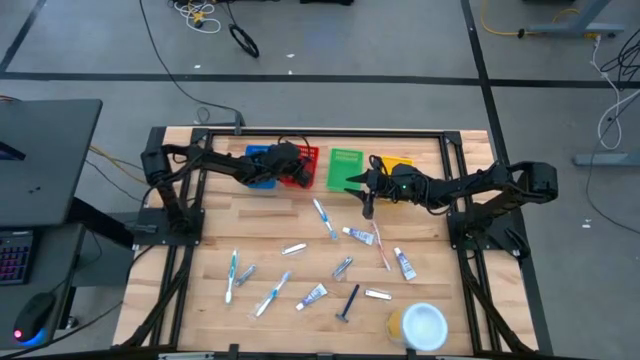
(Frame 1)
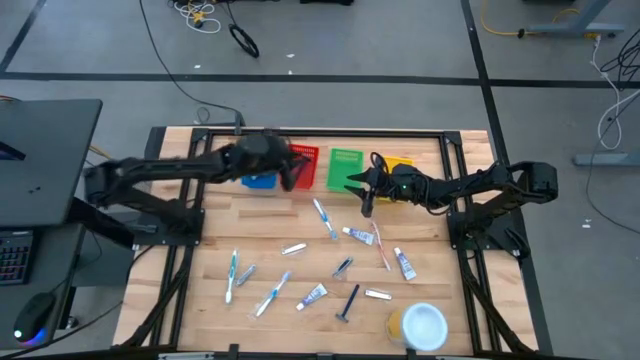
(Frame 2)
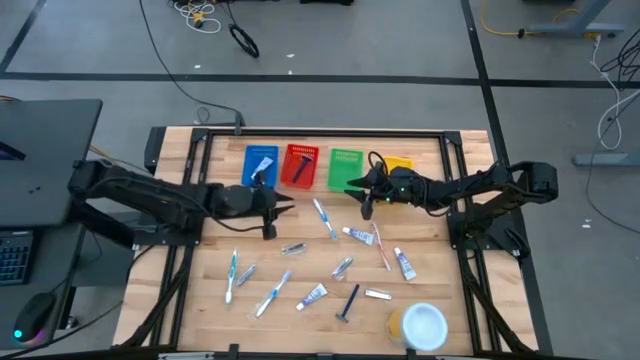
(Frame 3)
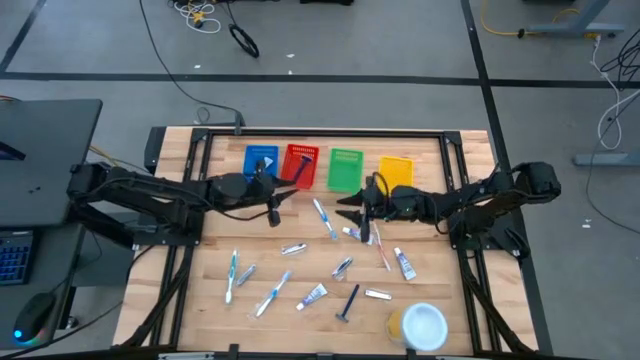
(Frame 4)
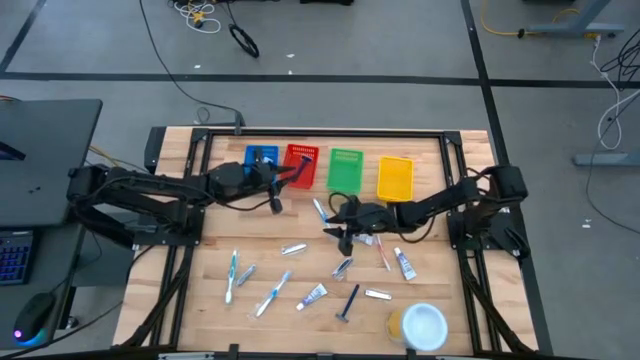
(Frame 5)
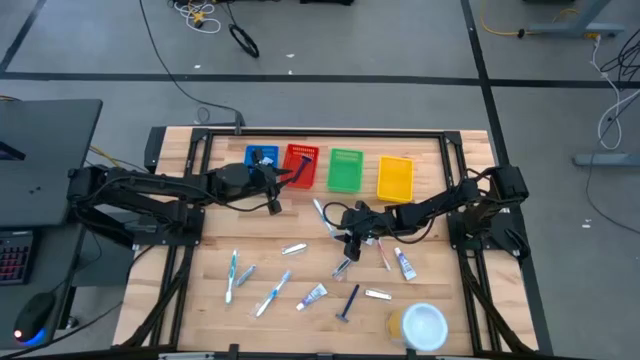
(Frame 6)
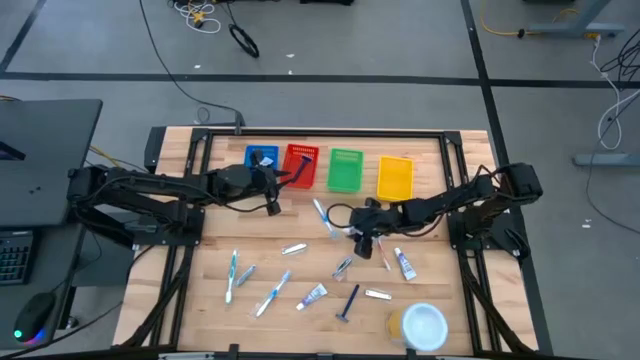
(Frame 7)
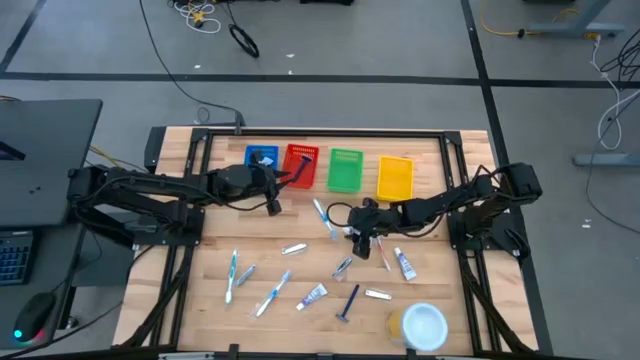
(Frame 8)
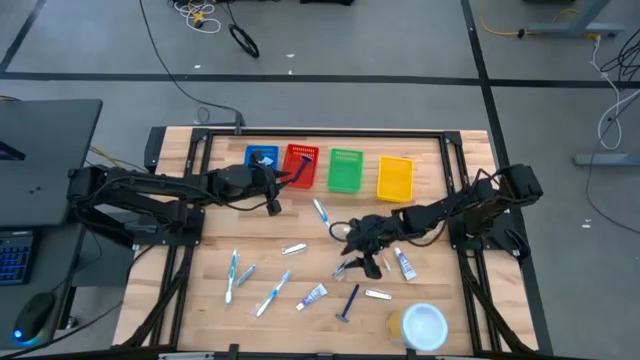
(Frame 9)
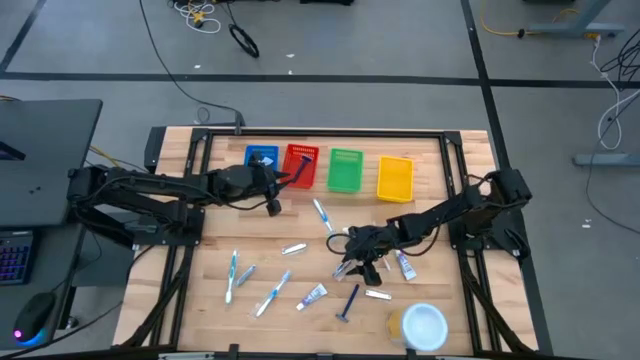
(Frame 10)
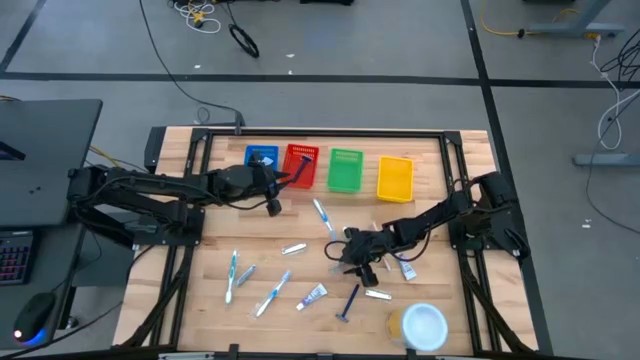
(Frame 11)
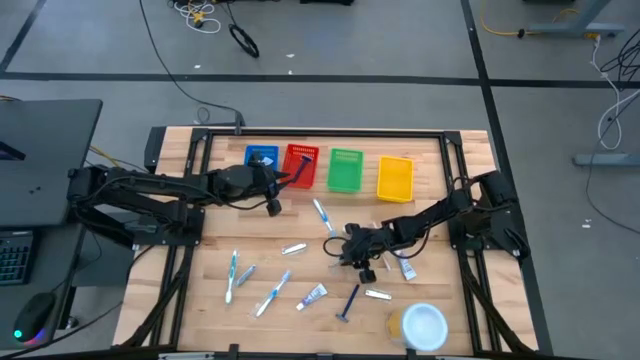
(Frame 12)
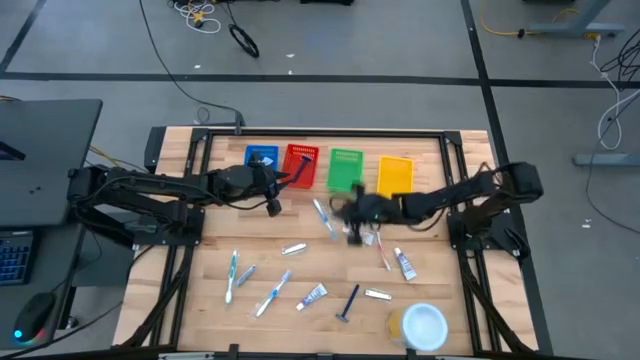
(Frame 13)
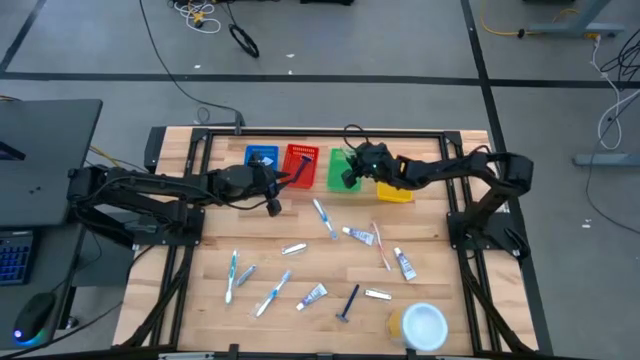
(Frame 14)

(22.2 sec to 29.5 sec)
Task: Pick & Place Travel size toiletries
Put the silver nail cutter into the green bin

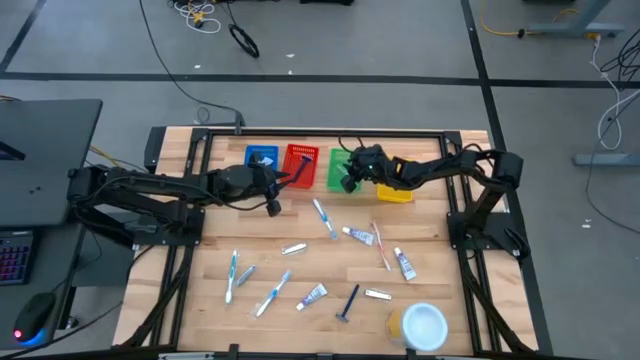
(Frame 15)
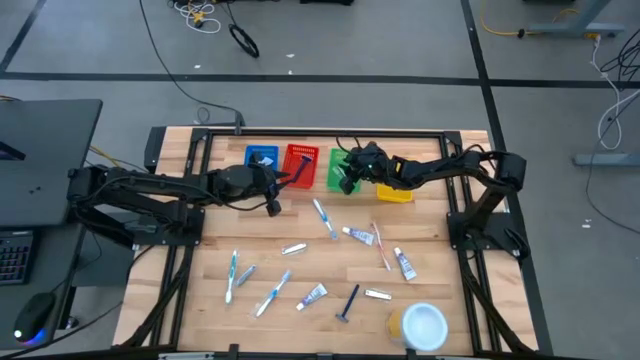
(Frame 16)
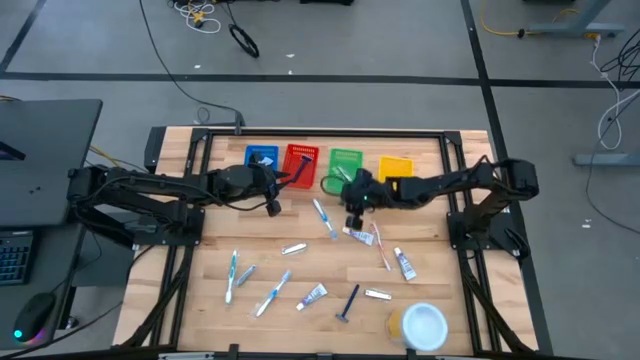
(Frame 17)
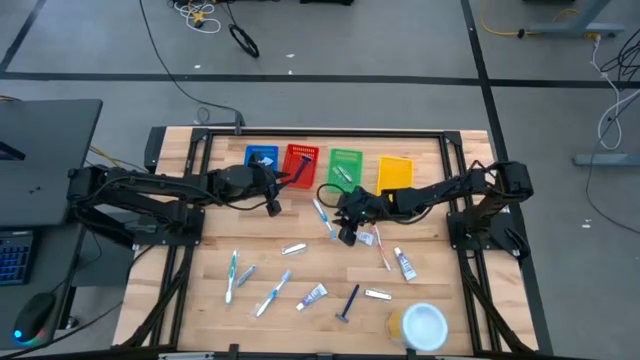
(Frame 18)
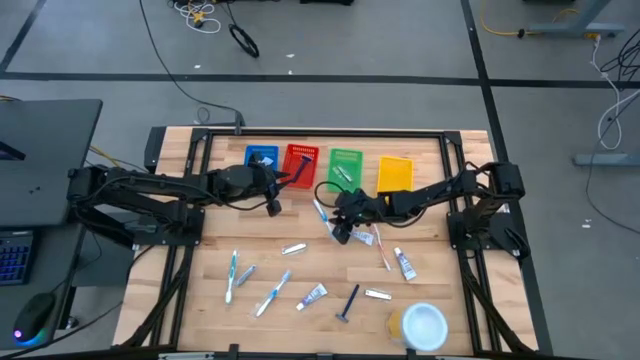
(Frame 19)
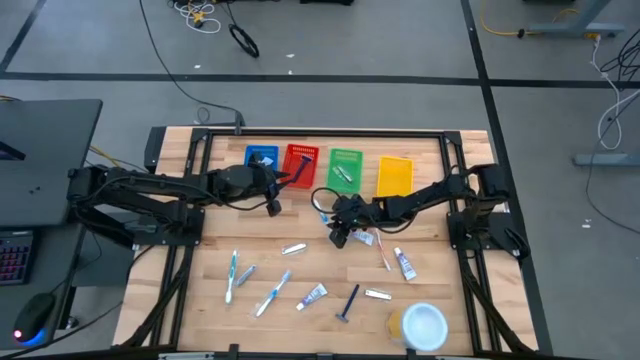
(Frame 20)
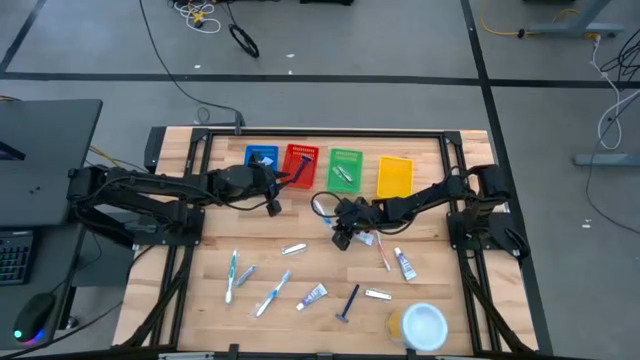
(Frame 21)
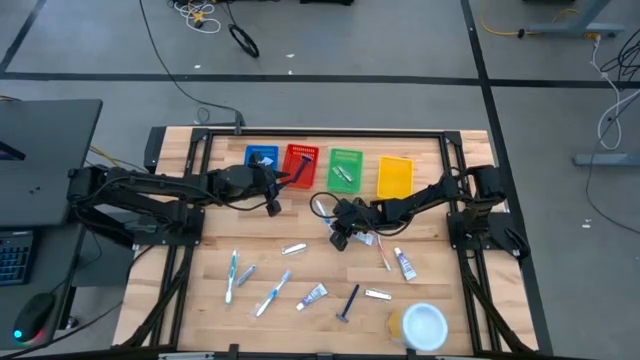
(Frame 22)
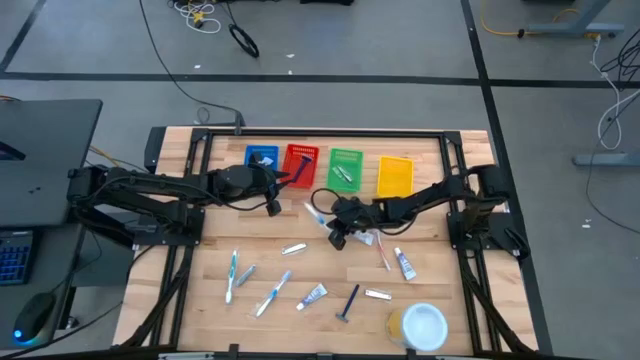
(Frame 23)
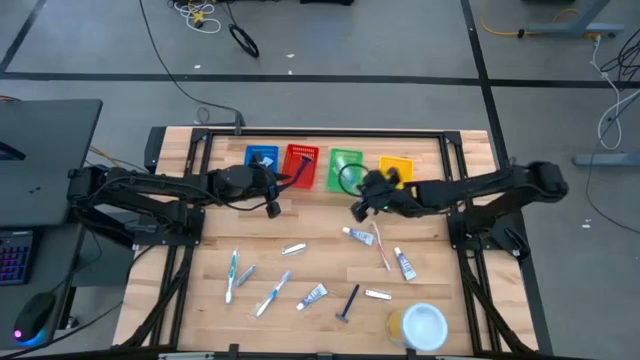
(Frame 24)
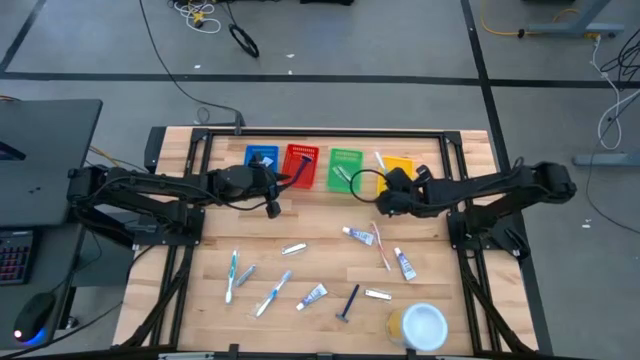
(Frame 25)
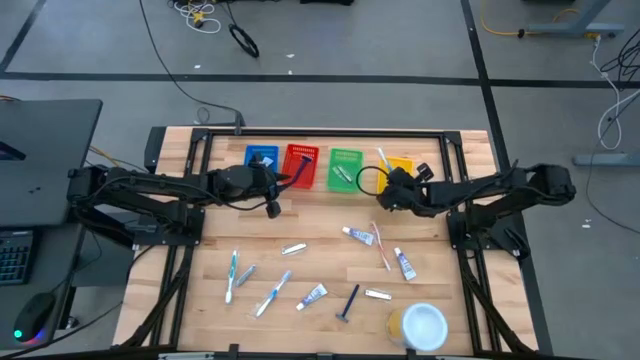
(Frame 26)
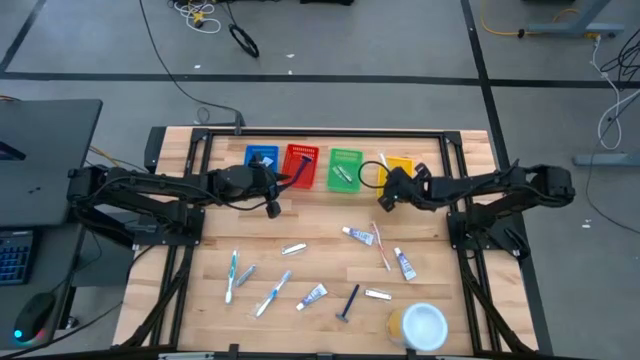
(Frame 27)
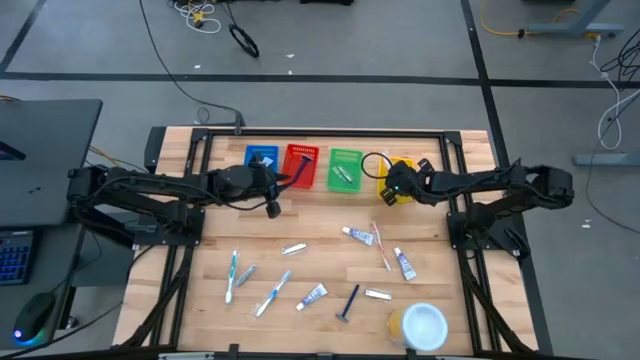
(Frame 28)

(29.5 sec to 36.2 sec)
Put the blue toothbrush into the yellow bin

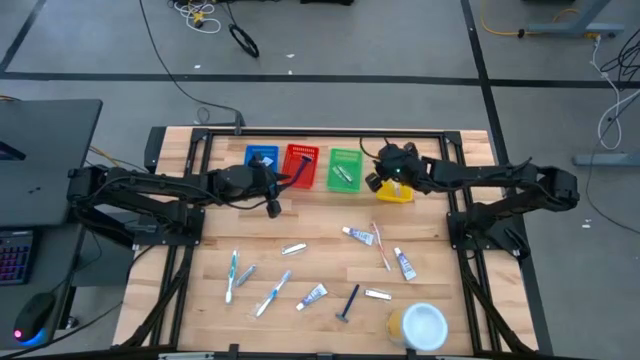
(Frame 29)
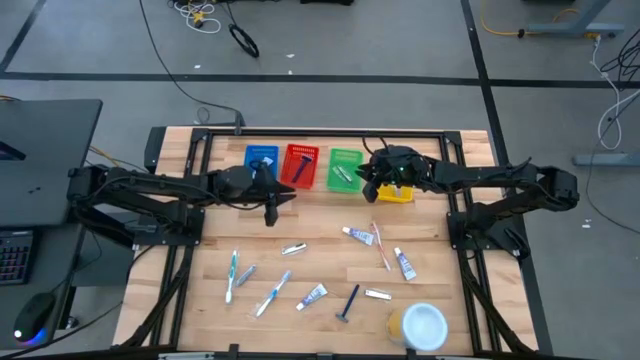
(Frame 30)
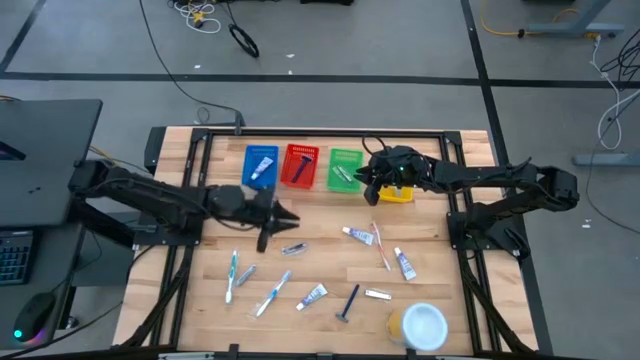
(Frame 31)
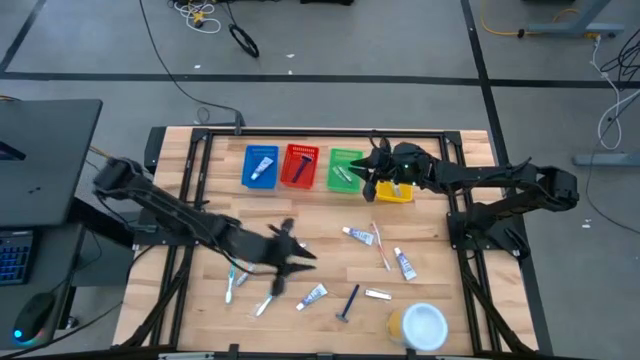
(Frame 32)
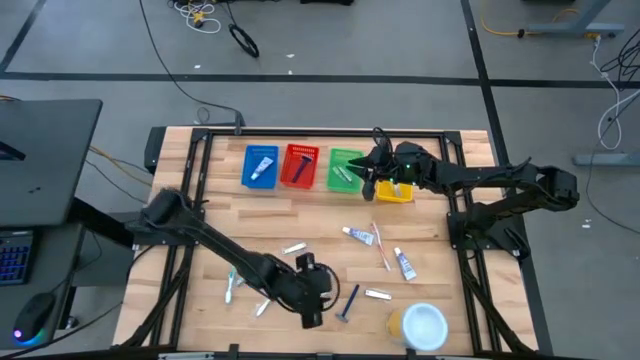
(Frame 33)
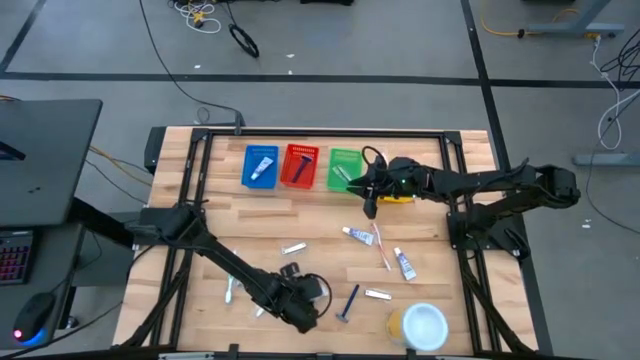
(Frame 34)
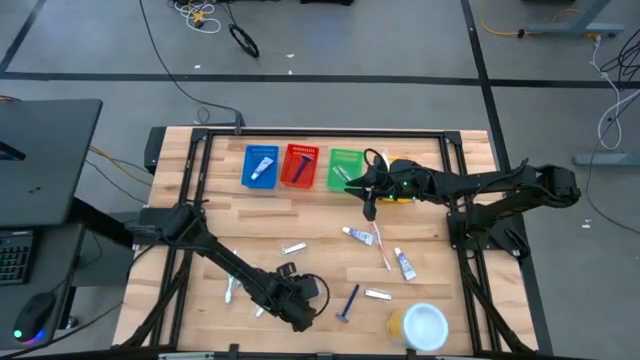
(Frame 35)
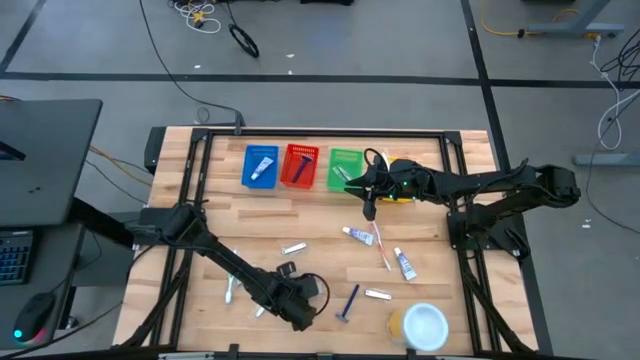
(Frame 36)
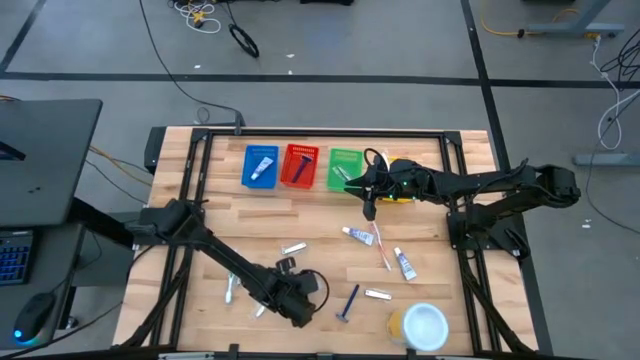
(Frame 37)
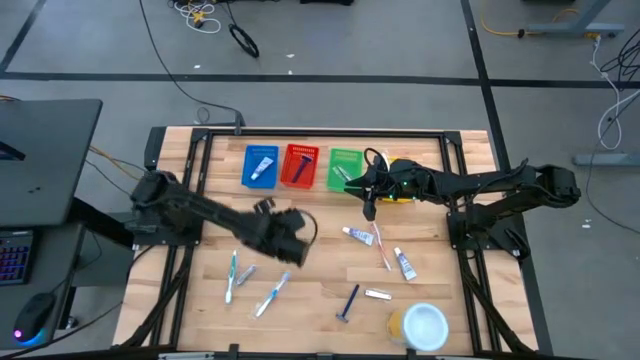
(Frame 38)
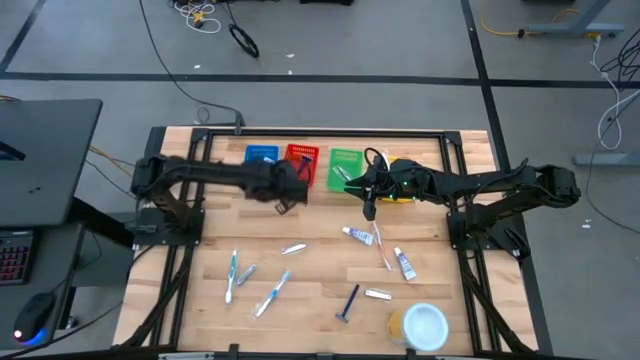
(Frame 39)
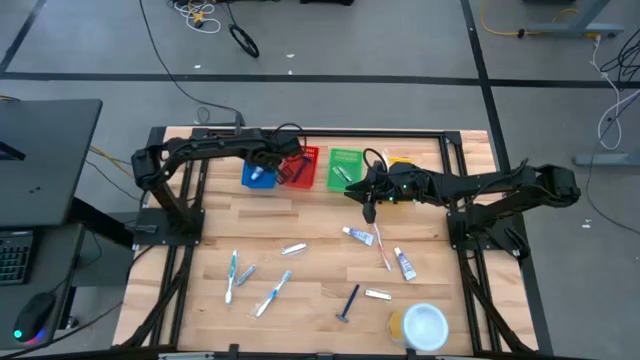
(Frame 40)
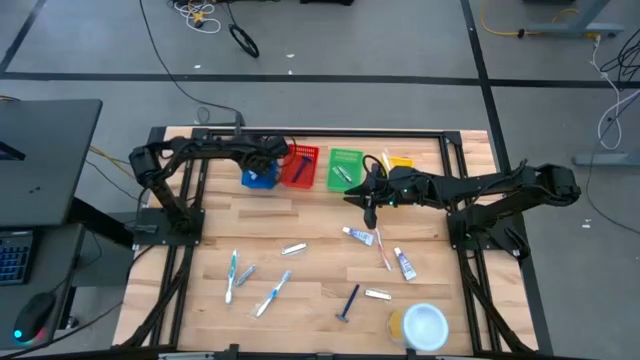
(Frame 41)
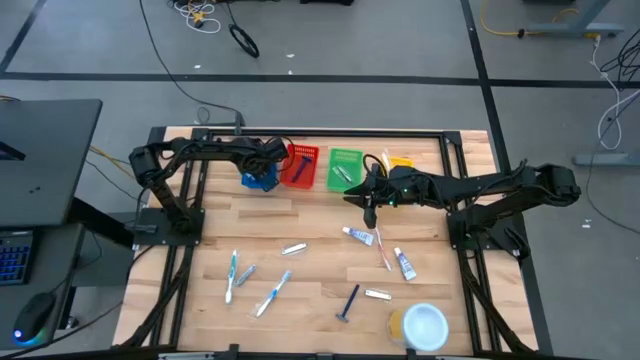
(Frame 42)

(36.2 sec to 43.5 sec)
Put the white toothpaste into the blue bin

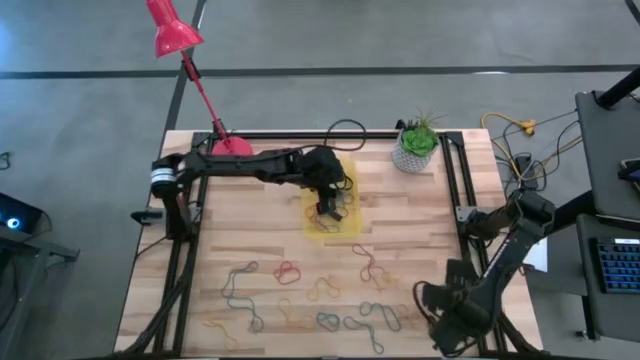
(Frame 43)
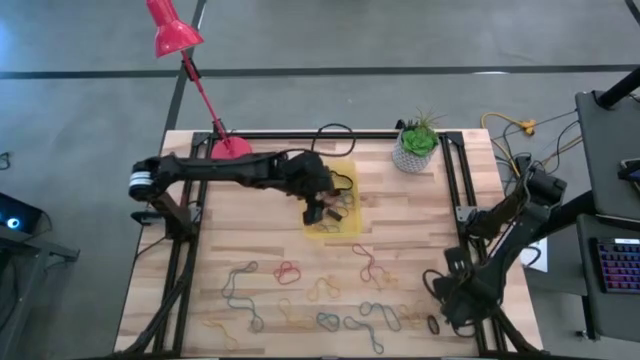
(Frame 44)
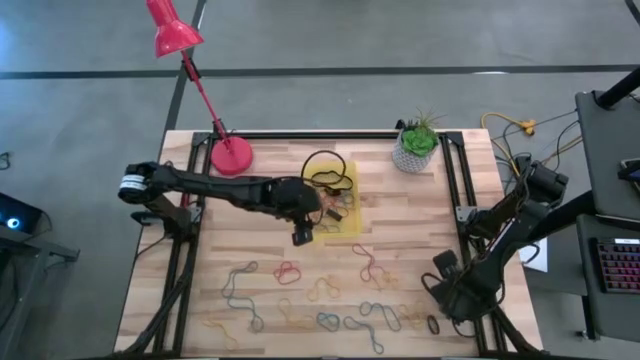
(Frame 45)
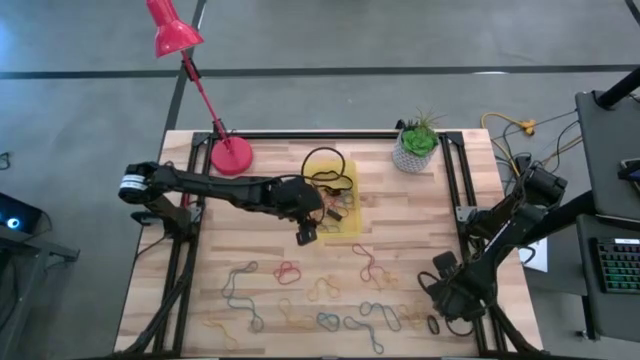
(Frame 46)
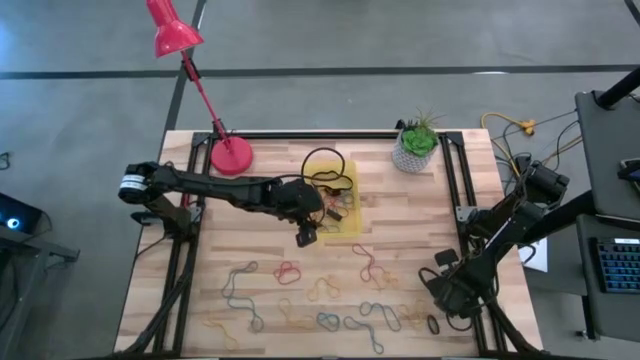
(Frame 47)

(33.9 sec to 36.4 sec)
Task: Pick and place rubber bands into bin
Put the blue rubber band into the yellow bin
